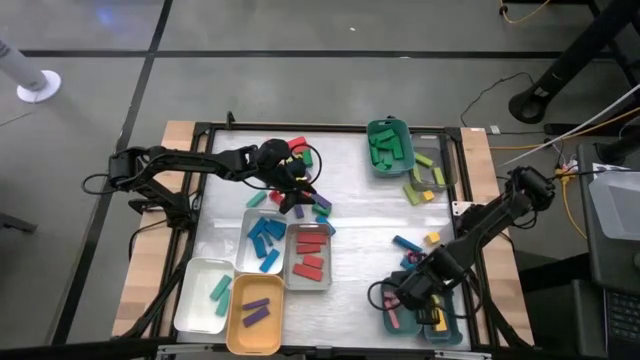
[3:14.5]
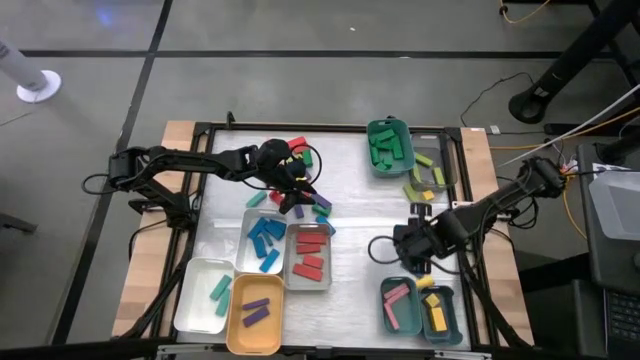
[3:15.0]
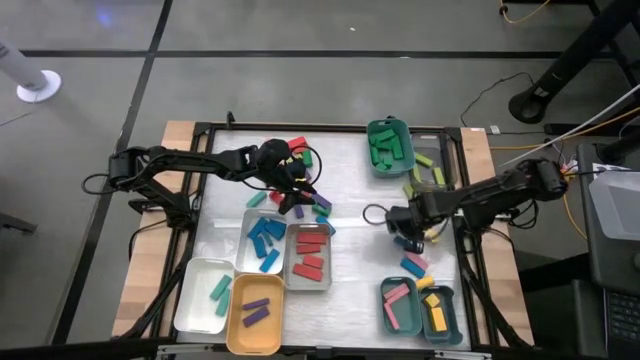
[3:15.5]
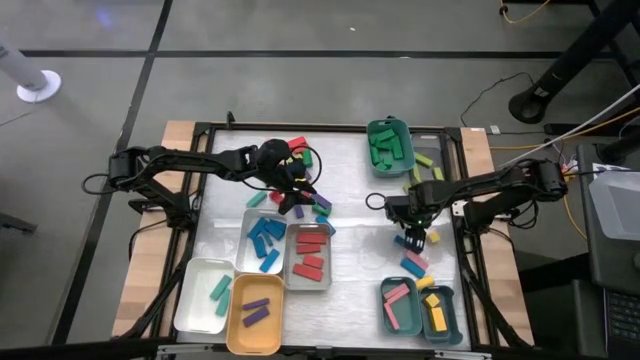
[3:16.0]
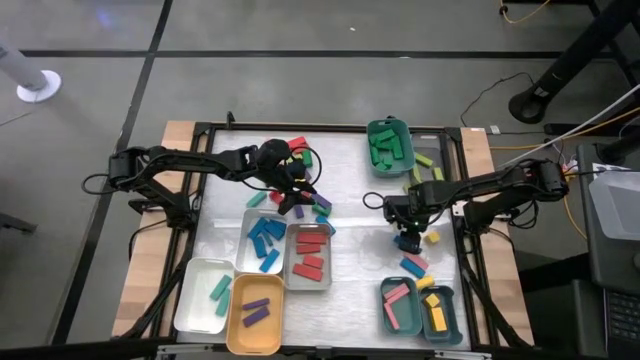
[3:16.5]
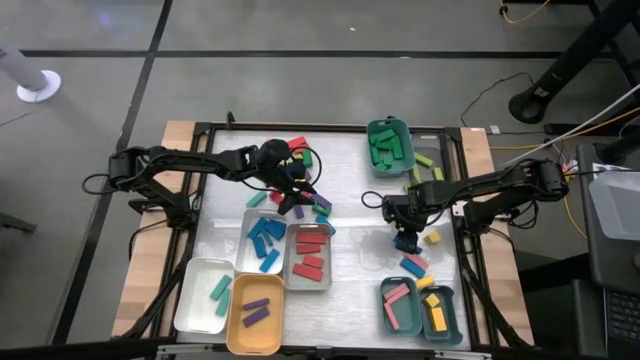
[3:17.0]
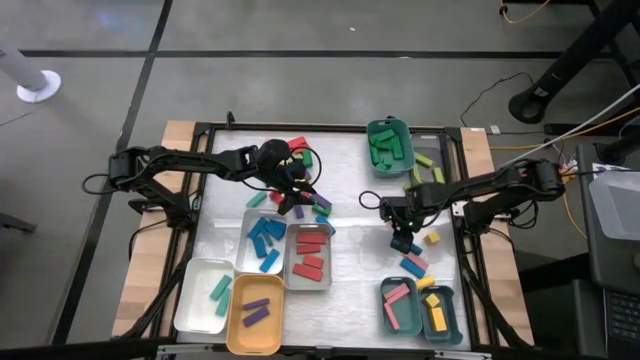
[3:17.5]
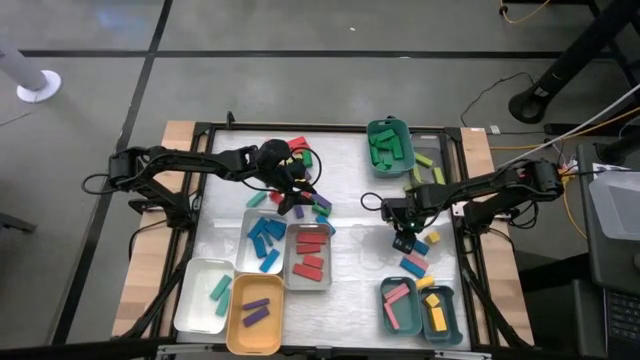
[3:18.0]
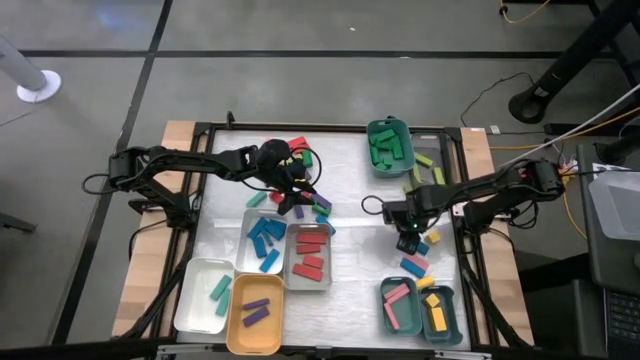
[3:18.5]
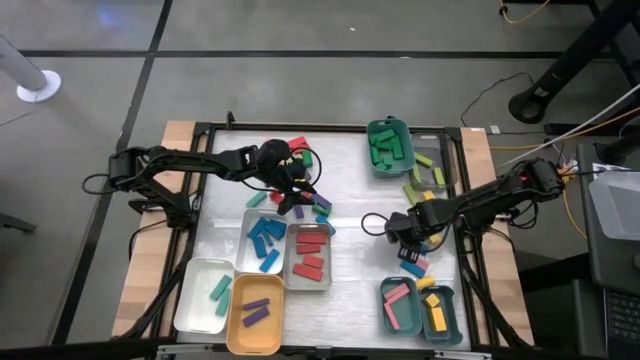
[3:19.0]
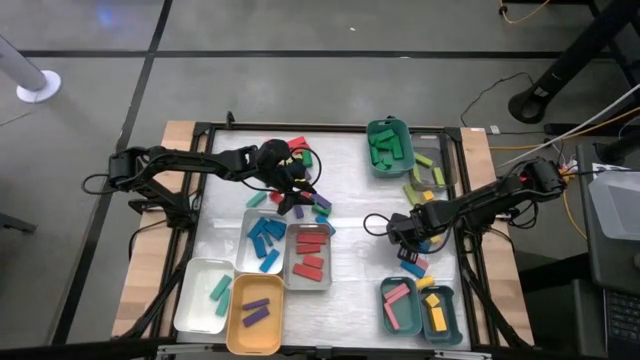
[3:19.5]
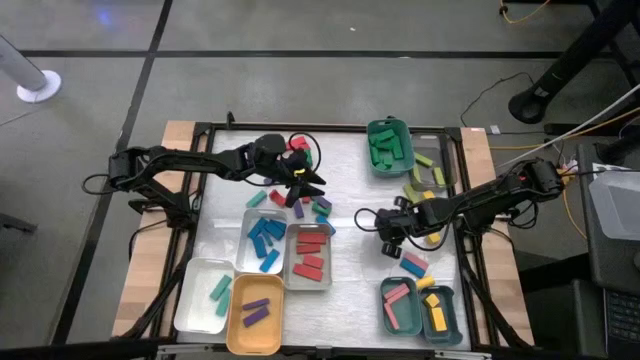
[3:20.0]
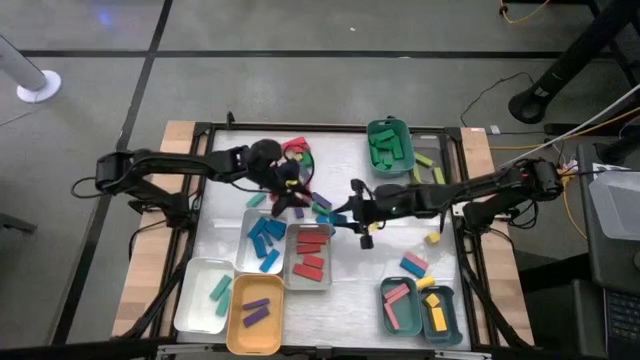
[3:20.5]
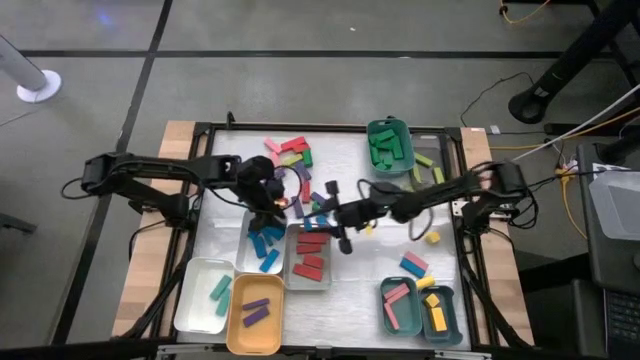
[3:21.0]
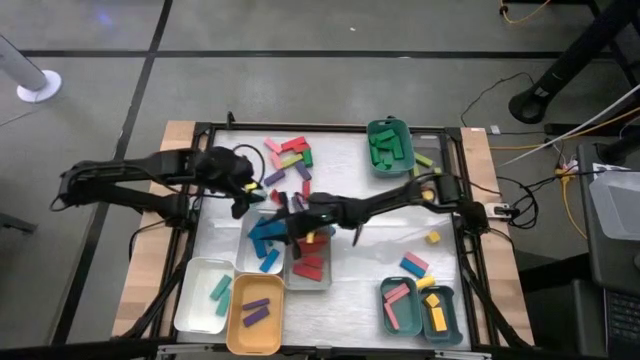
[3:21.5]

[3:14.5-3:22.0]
Task: Sort blocks
Put the blue block into the top white bin

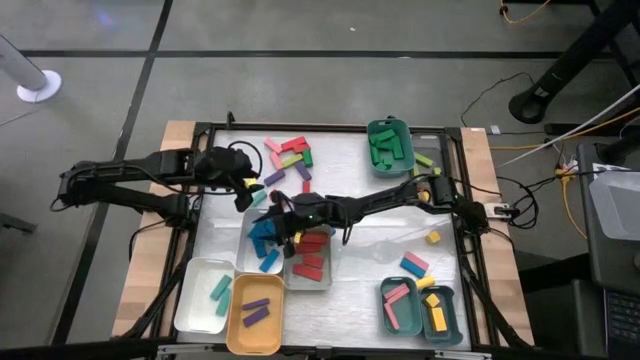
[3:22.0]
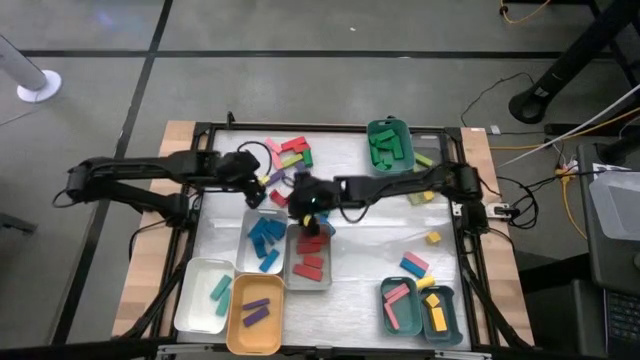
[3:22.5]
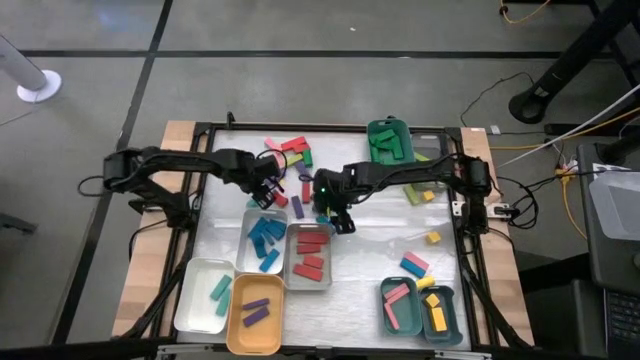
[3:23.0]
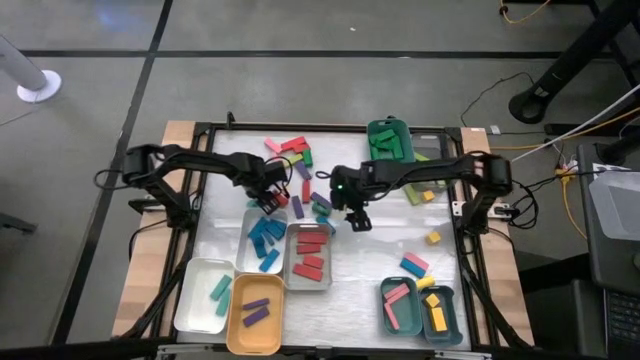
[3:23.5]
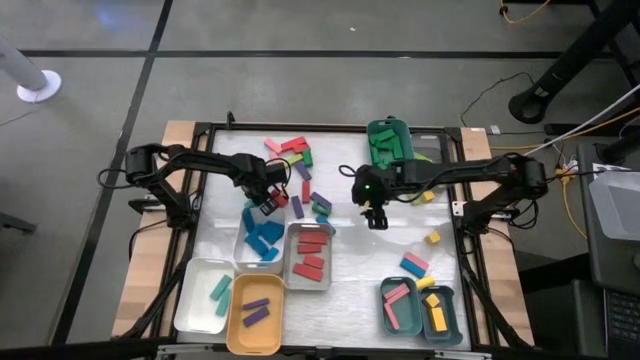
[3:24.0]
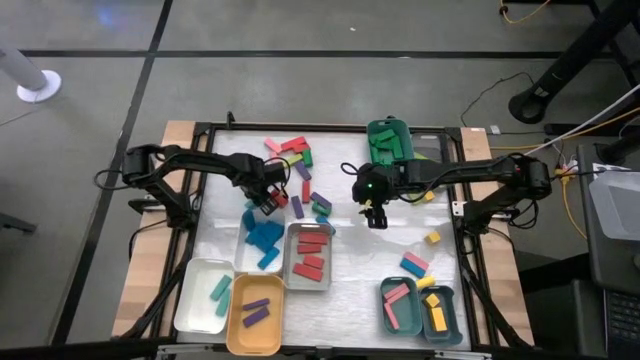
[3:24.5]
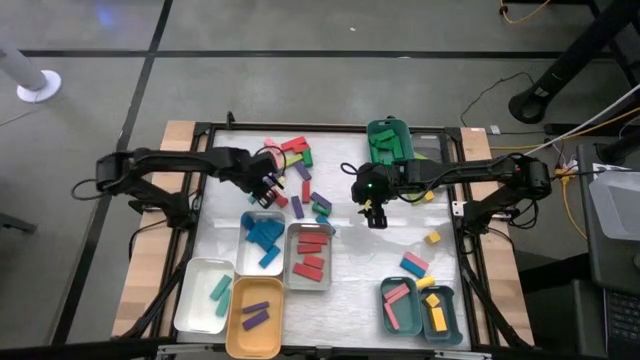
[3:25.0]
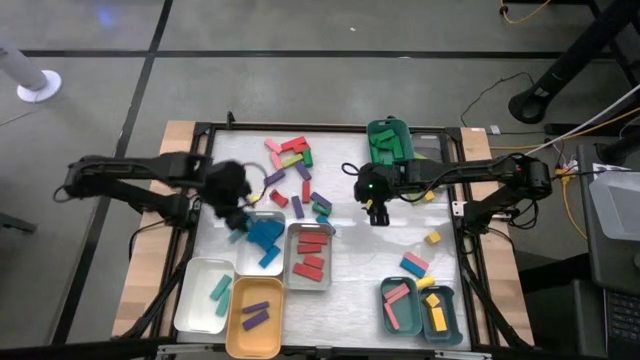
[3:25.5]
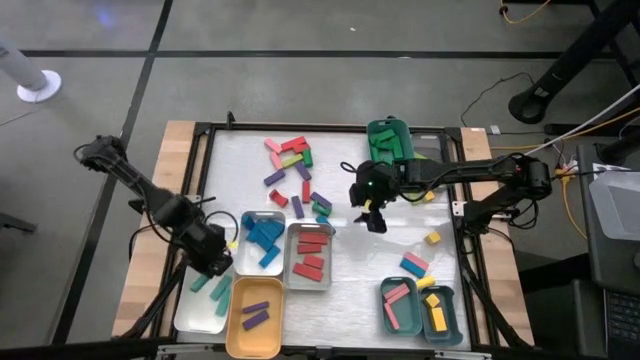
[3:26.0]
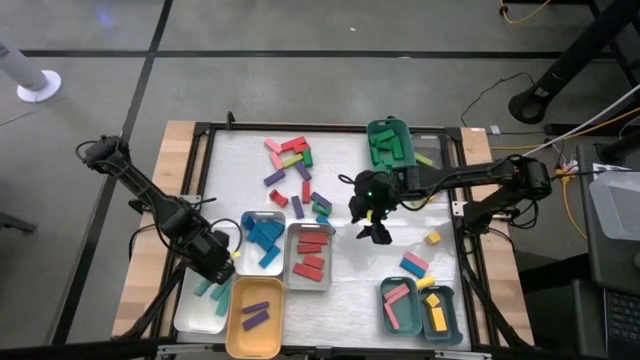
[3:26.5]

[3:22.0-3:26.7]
Put the light blue block into the bottom white bin

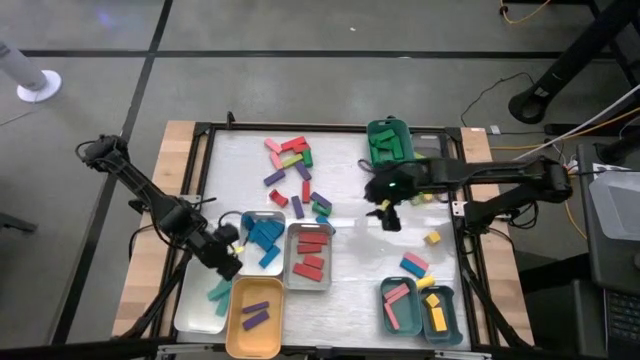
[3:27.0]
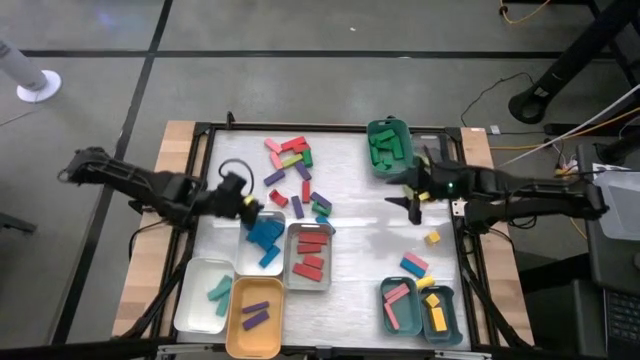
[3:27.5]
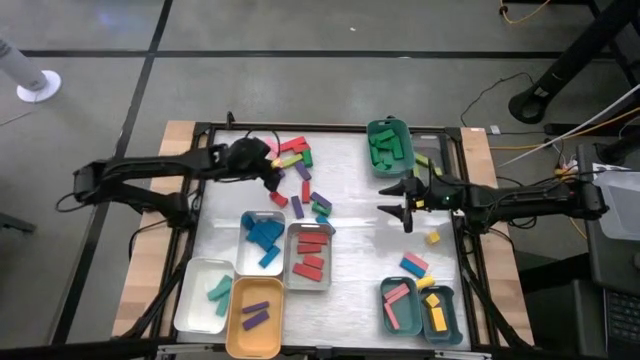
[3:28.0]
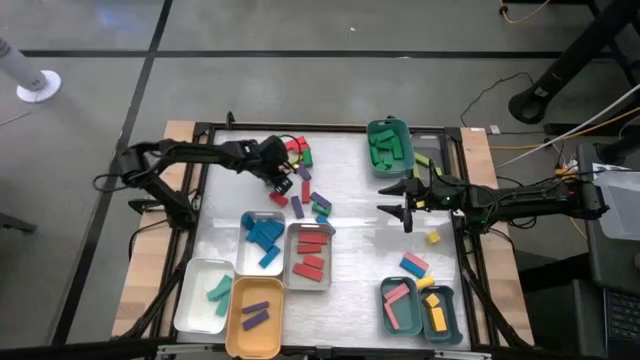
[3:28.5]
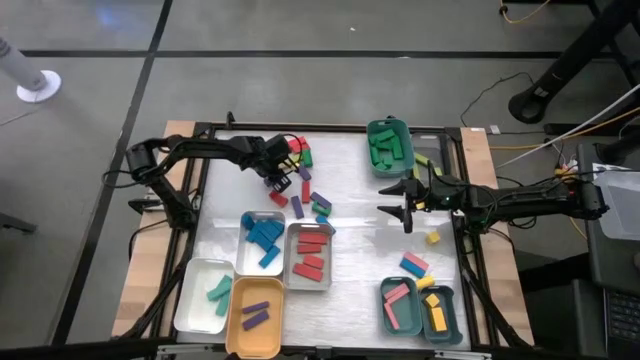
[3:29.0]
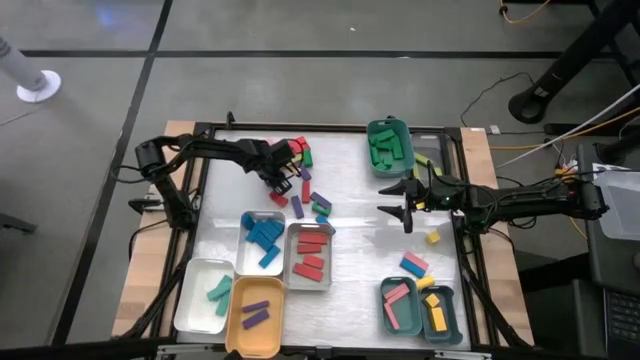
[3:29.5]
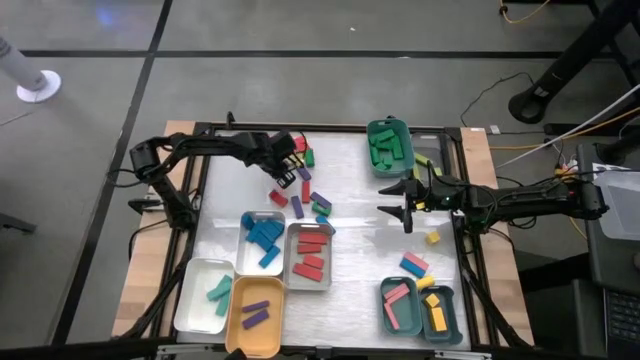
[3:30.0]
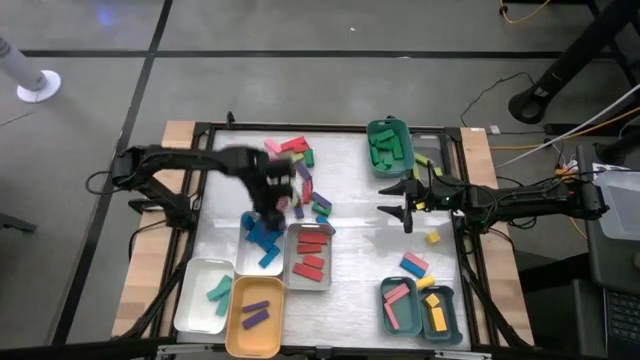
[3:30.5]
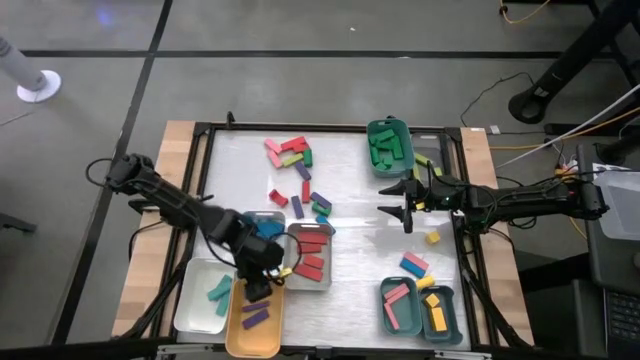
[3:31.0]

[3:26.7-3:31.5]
Put the purple block into the yellow bin

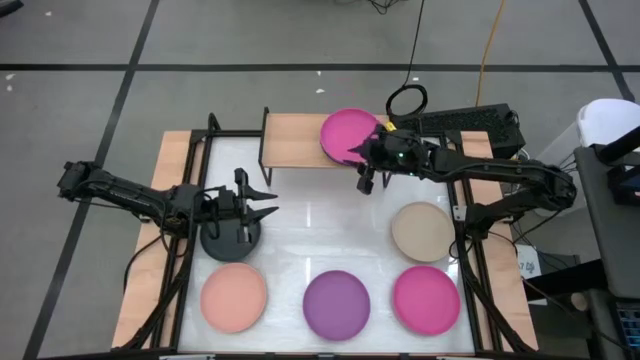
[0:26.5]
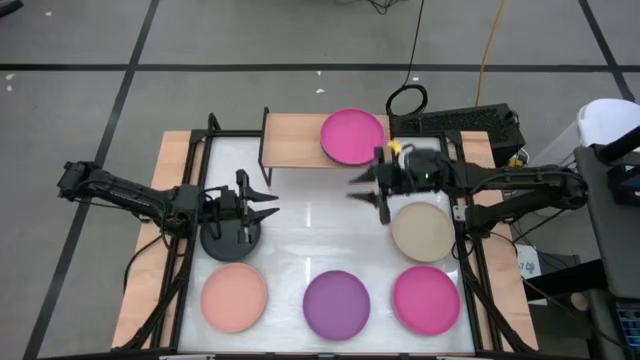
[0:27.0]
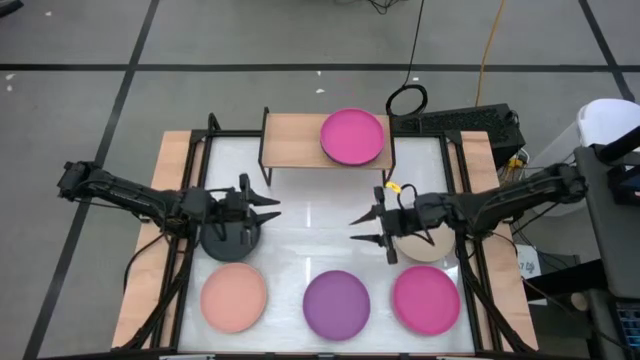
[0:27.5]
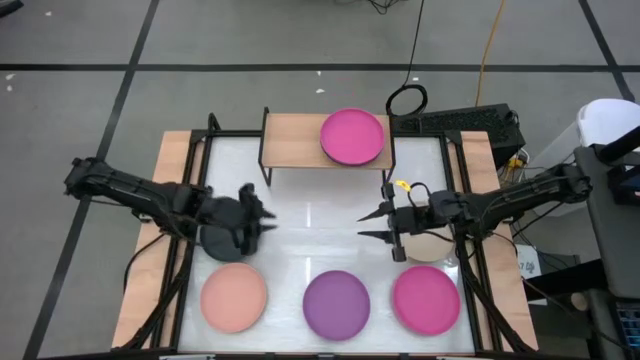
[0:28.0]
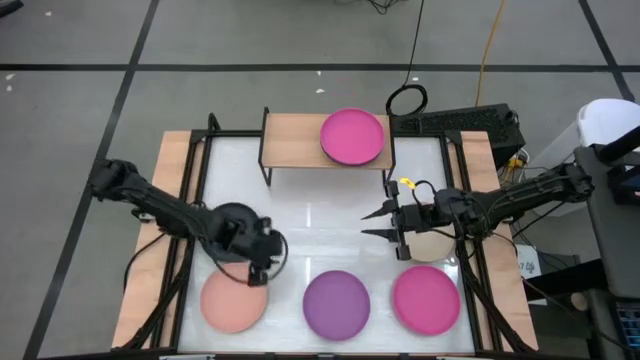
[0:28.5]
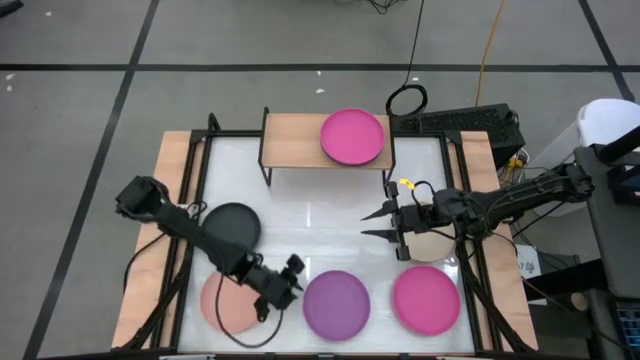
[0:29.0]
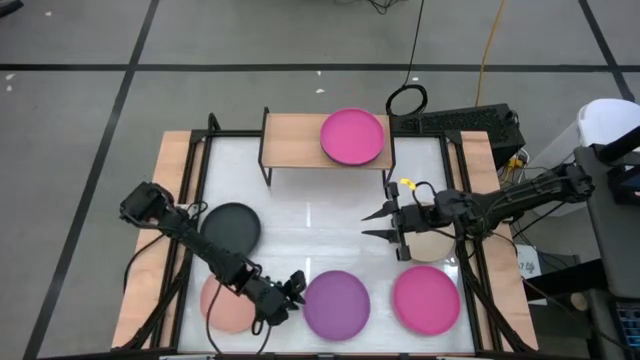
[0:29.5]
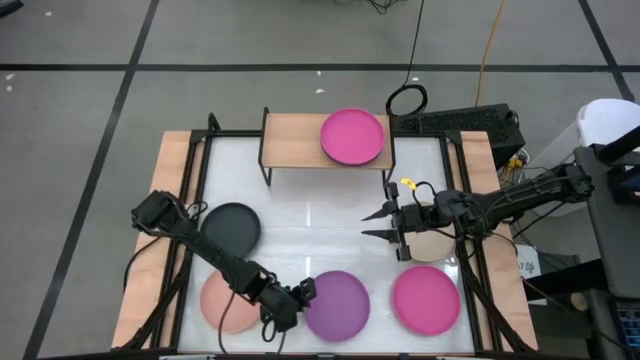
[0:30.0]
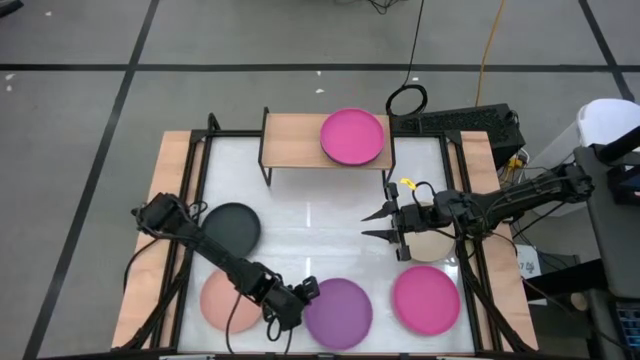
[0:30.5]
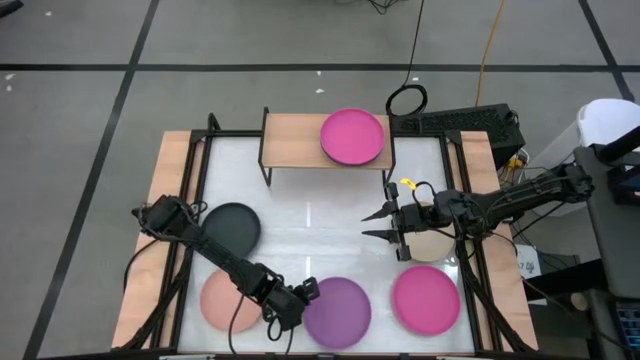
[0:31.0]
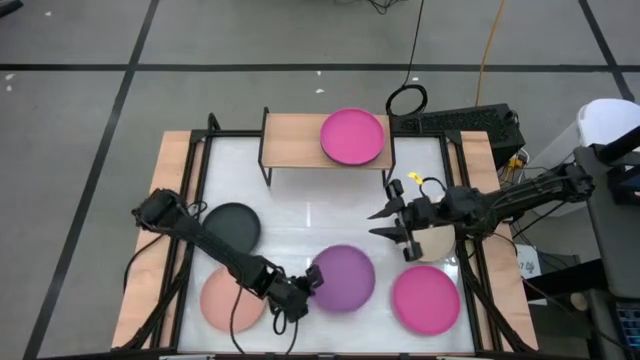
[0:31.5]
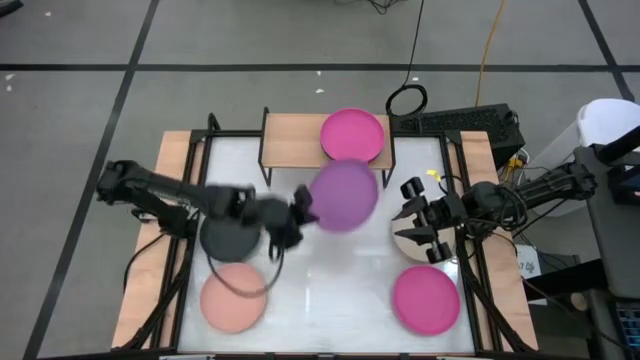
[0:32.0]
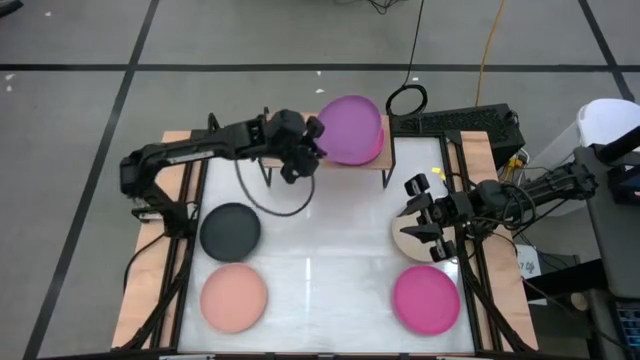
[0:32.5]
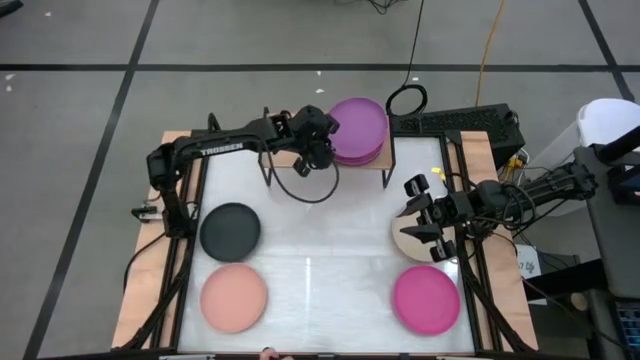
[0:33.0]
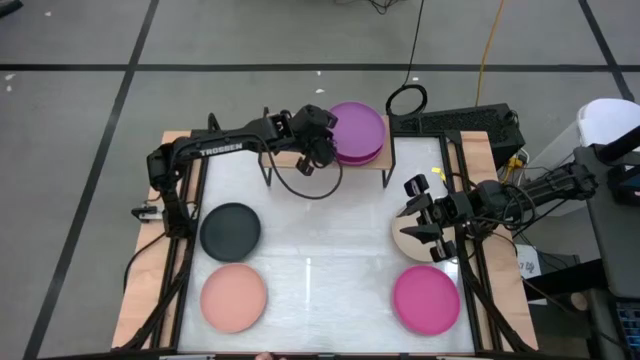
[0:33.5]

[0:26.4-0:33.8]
Task: Place and stack plates onto a shelf
Stack the violet plate on top of the pink plate on the shelf
